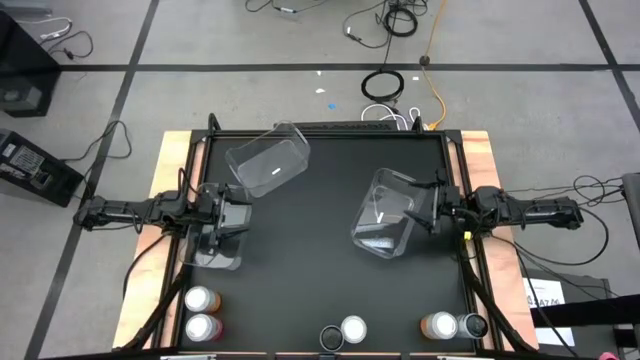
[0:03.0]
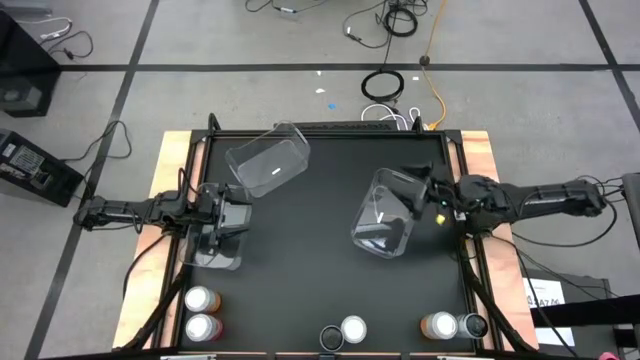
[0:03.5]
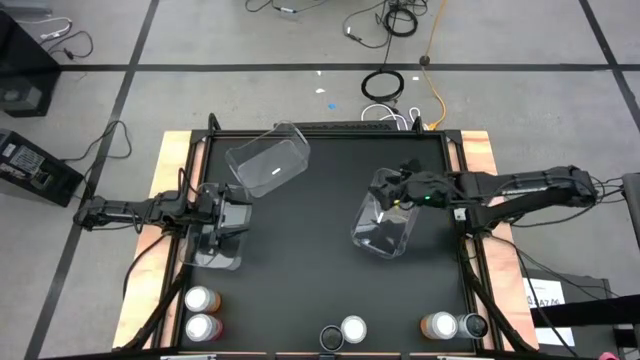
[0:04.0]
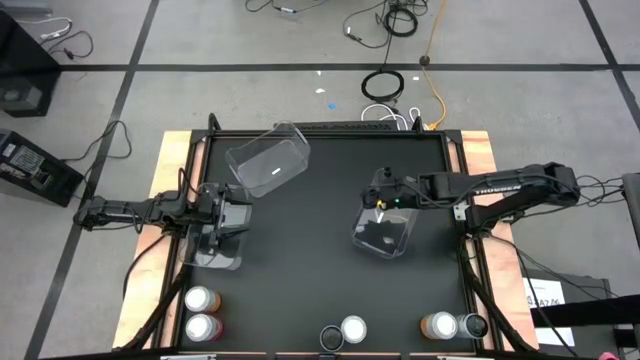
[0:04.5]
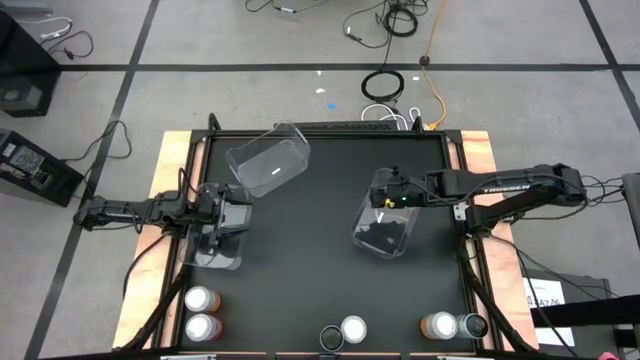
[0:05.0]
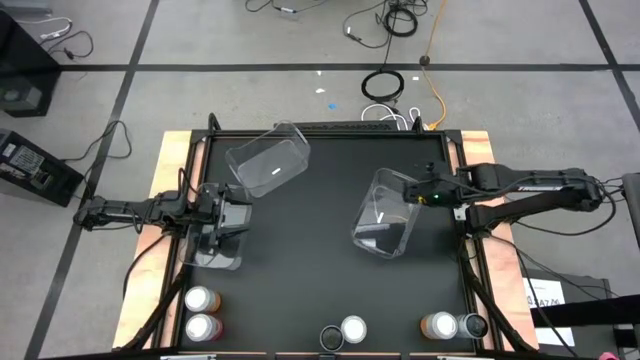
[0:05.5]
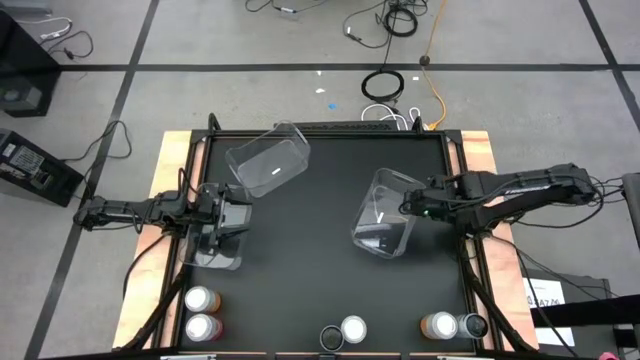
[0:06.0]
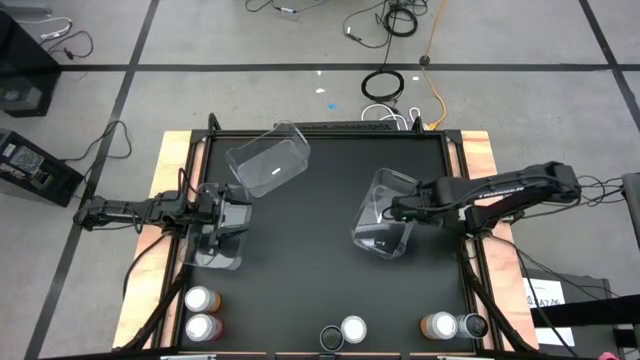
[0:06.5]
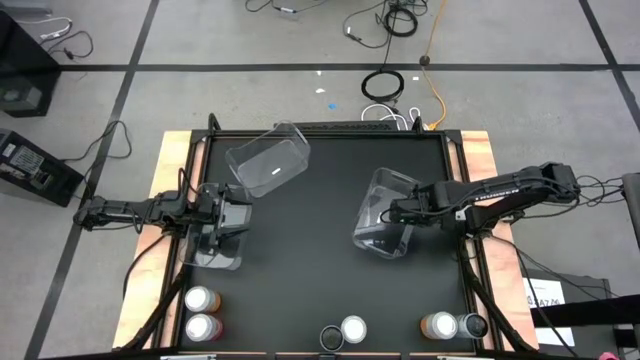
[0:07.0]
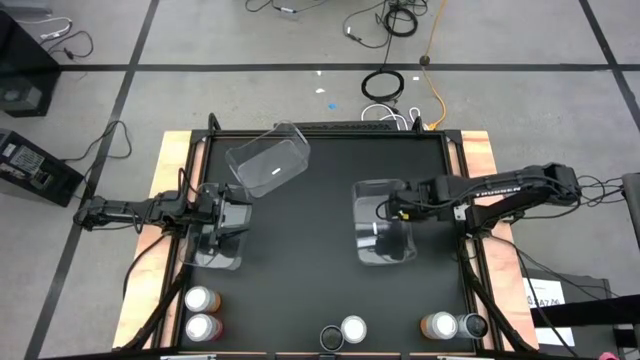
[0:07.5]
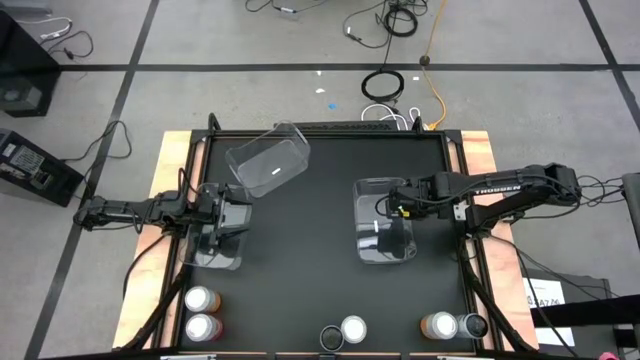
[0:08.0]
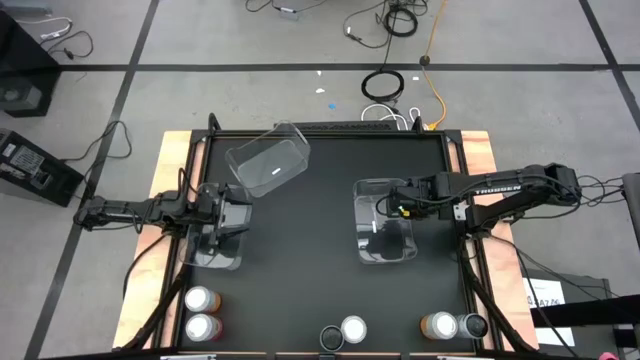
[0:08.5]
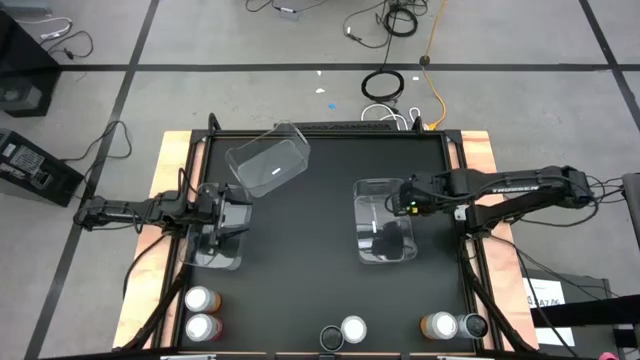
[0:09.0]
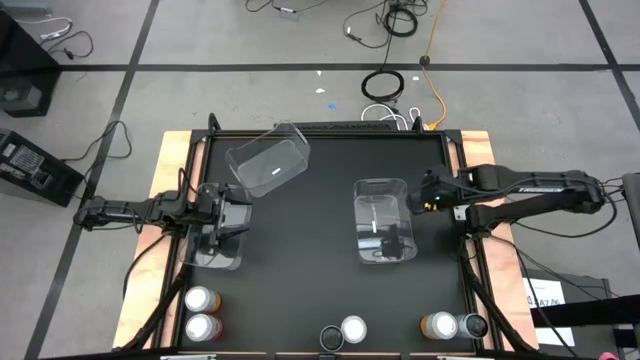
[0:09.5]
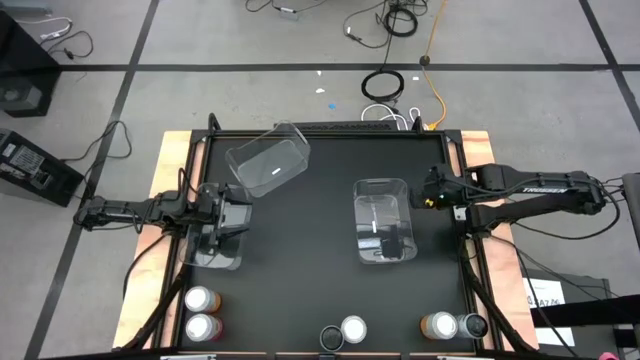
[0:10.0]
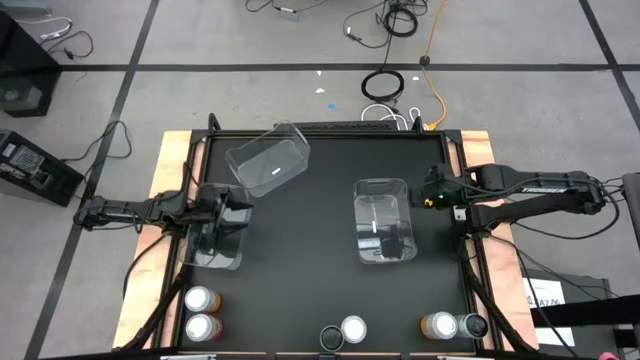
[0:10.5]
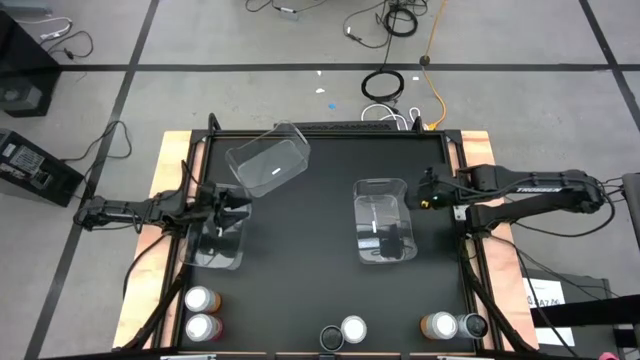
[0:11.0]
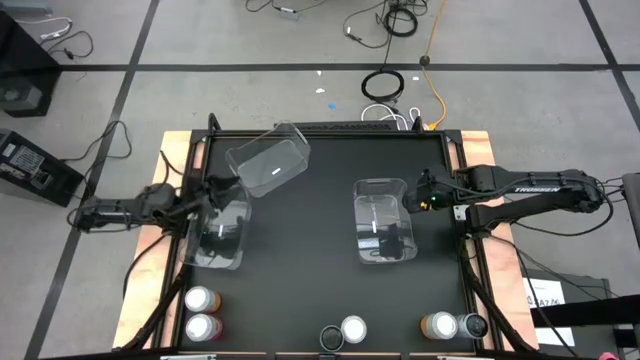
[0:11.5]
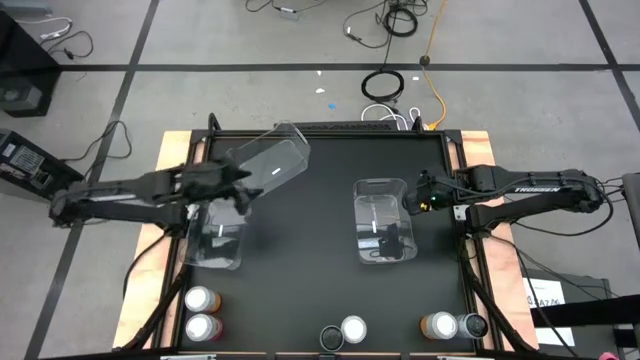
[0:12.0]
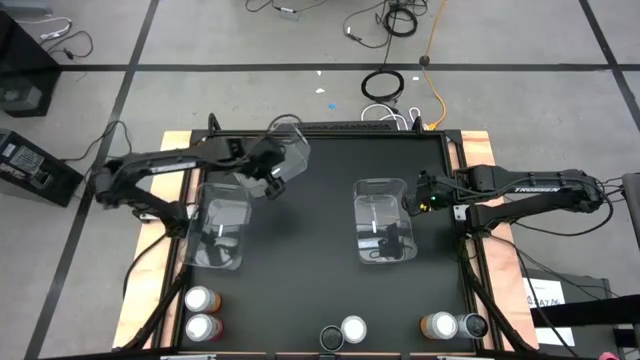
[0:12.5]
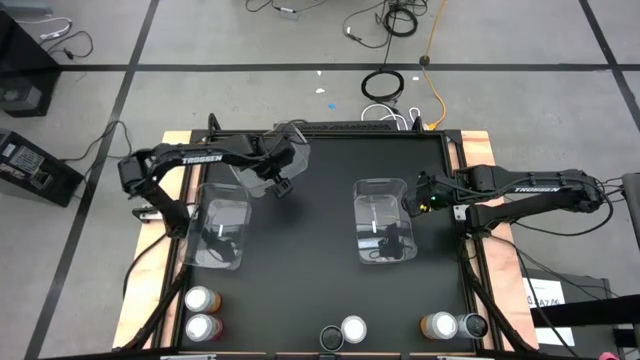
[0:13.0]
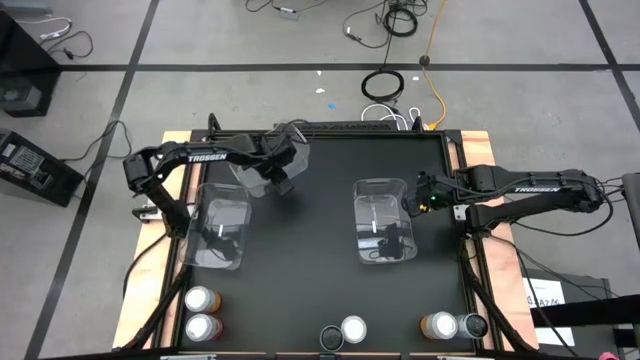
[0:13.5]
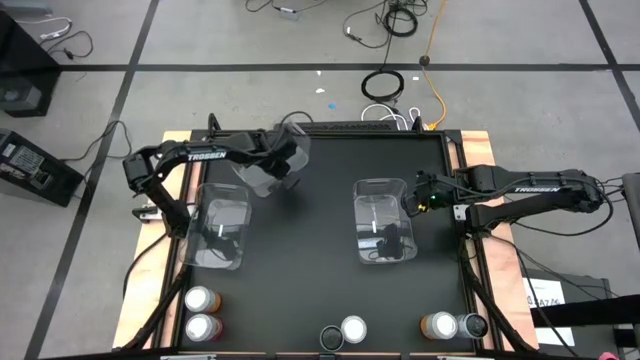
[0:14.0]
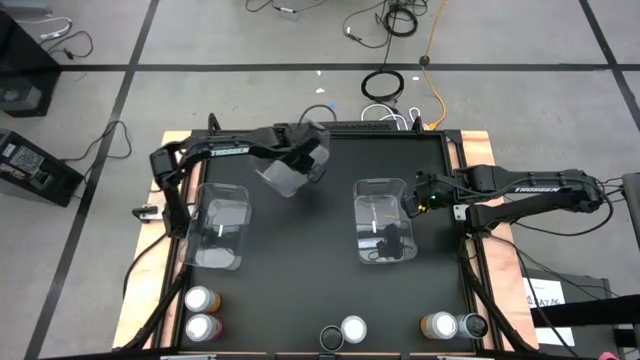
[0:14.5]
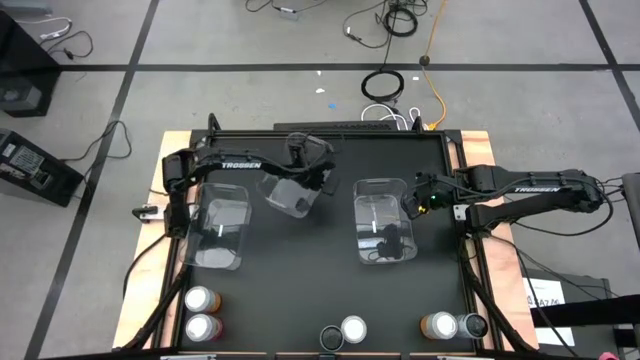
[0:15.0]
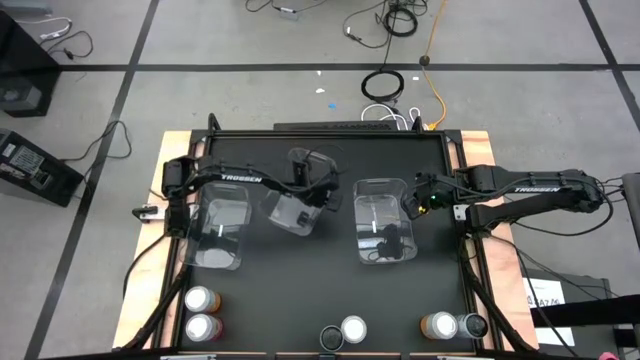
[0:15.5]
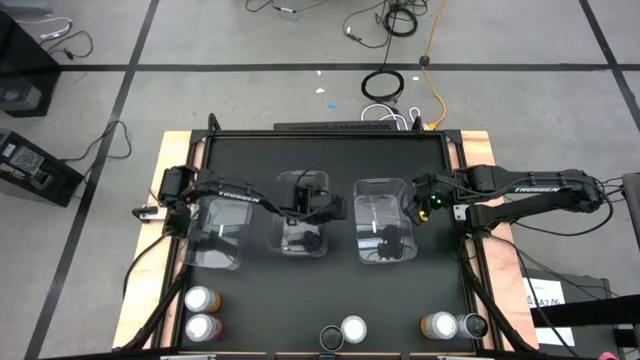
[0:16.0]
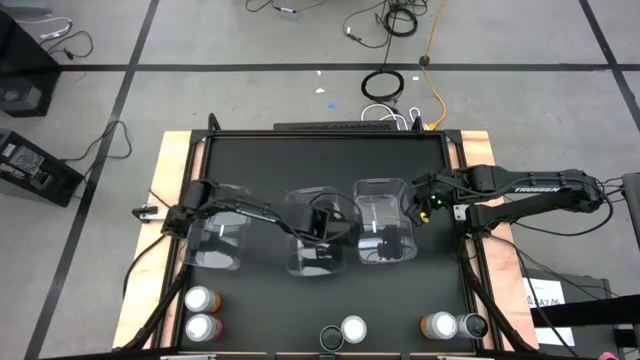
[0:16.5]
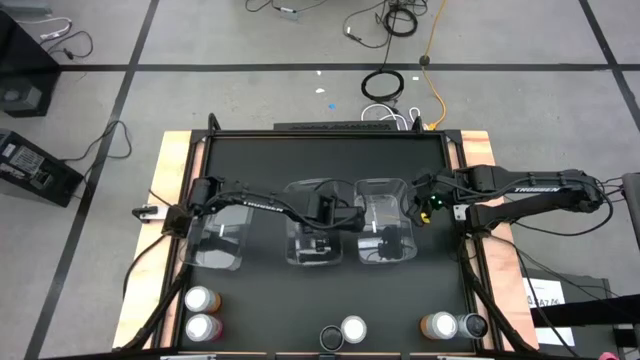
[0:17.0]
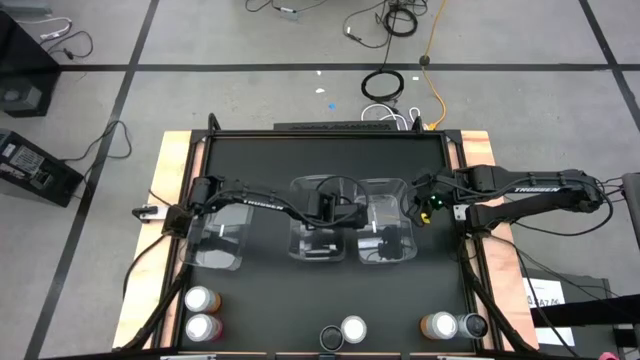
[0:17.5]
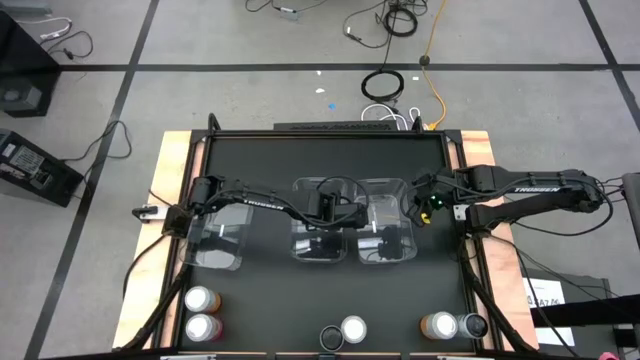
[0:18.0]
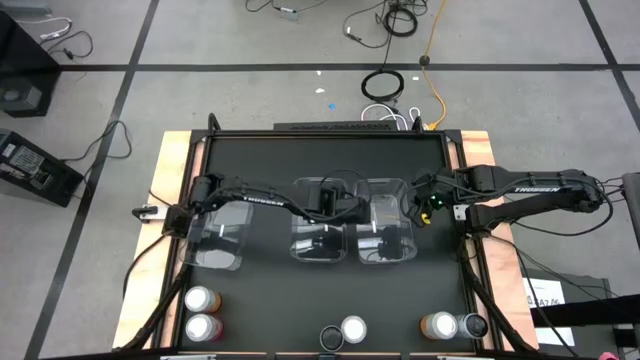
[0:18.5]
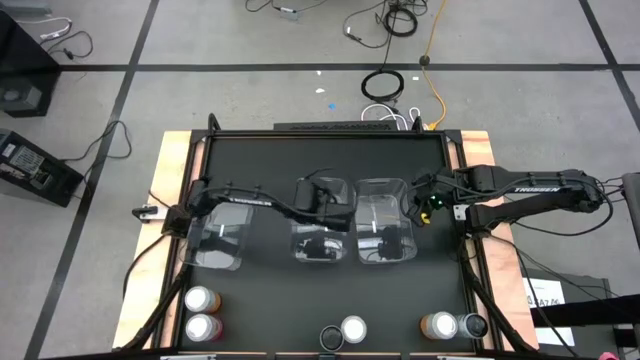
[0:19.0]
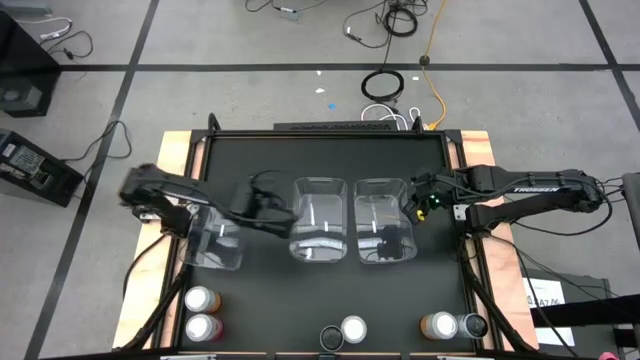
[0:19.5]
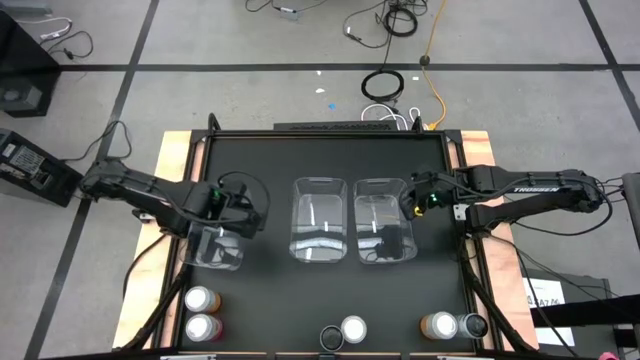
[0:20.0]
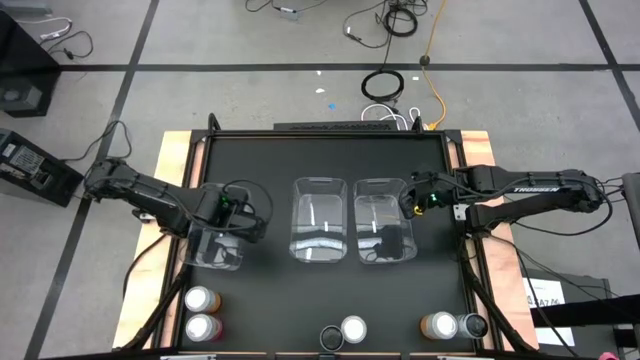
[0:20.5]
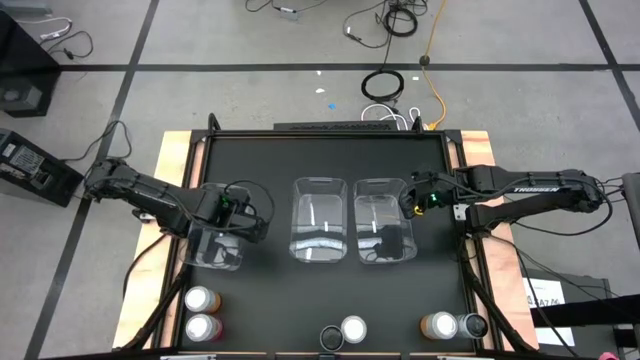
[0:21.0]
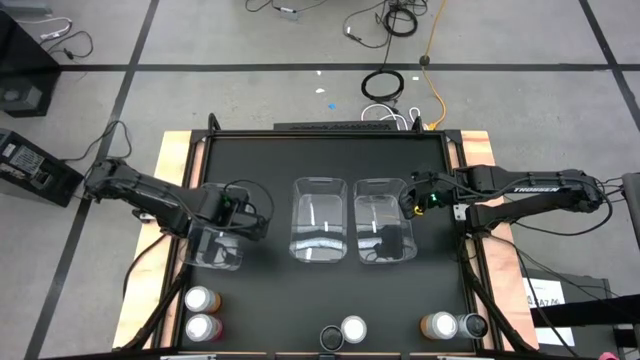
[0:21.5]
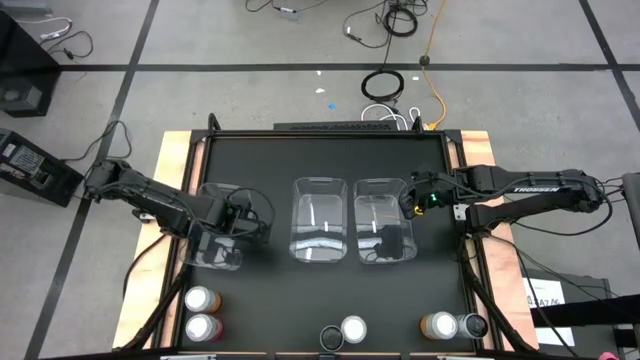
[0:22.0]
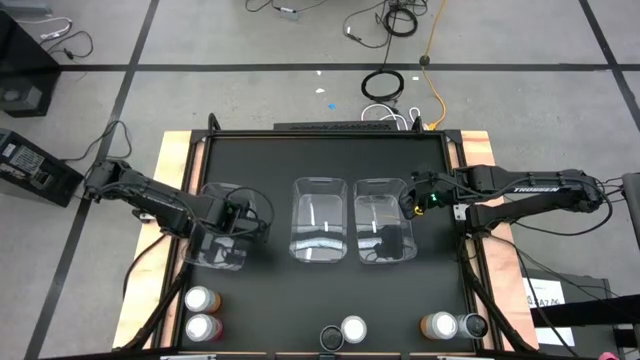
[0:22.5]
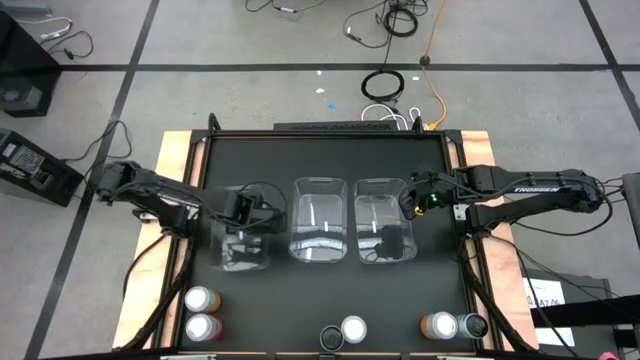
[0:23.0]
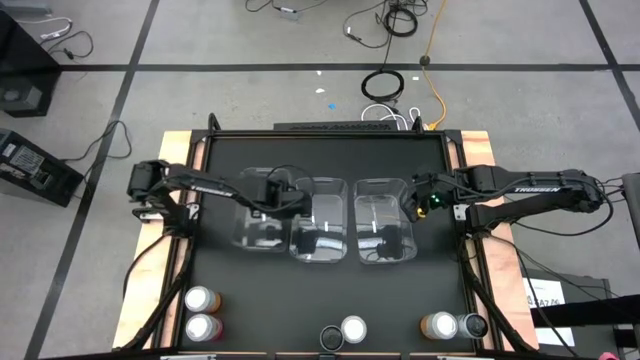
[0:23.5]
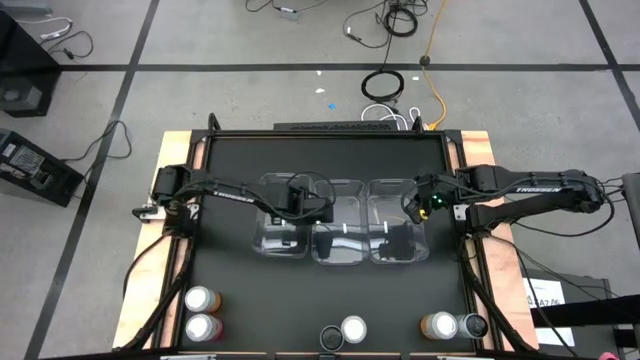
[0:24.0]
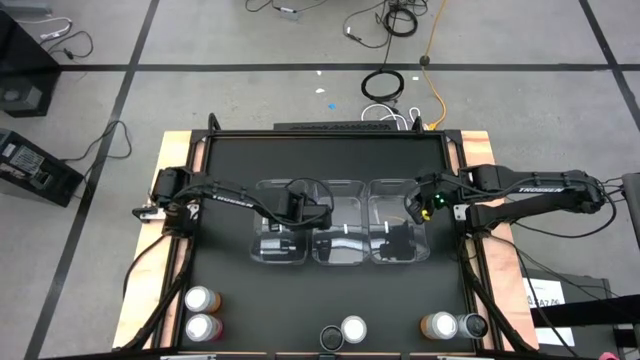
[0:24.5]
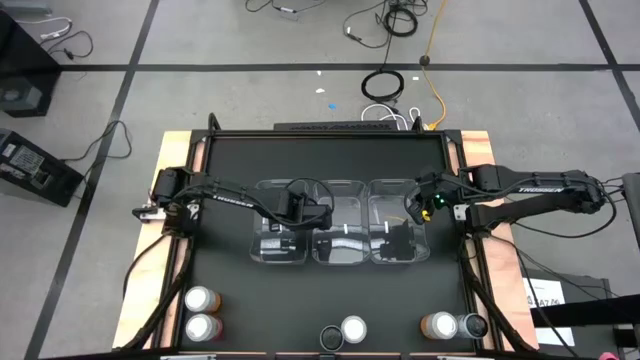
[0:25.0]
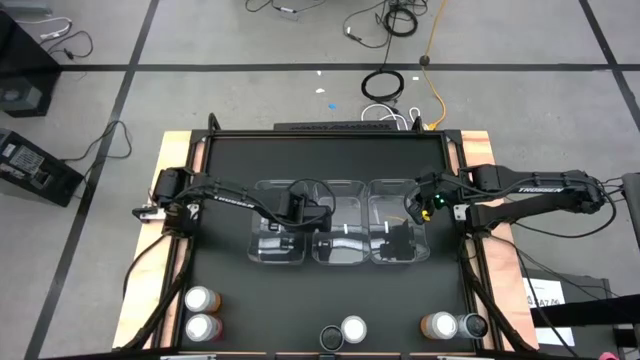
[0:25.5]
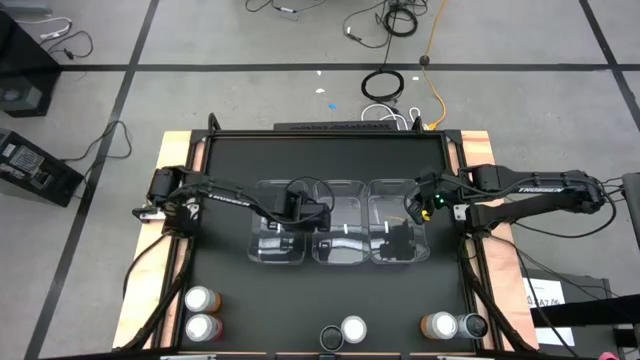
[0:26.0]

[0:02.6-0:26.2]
Task: Sort soda cans
Adjust the transparent bins
